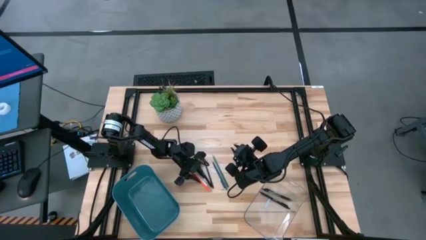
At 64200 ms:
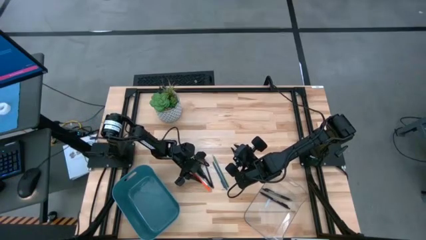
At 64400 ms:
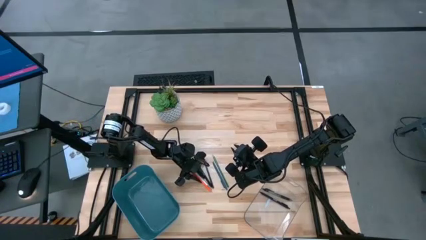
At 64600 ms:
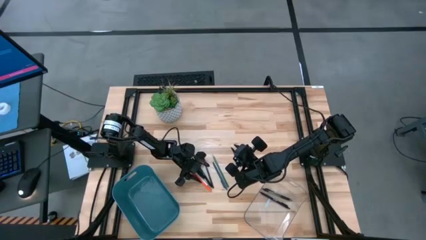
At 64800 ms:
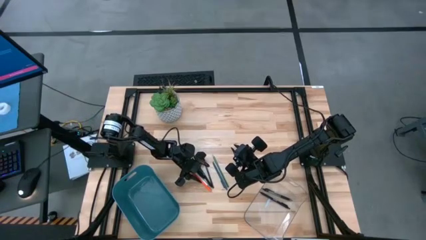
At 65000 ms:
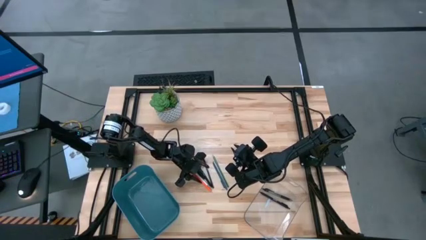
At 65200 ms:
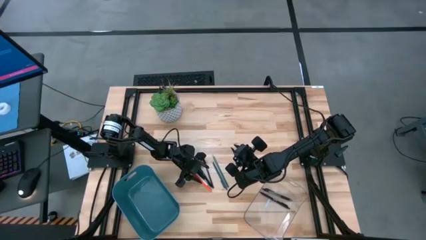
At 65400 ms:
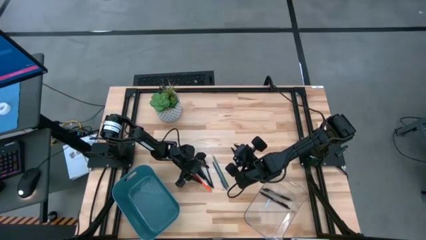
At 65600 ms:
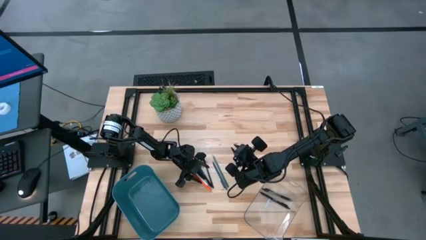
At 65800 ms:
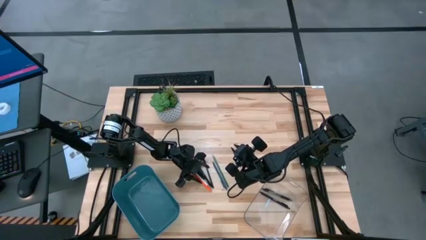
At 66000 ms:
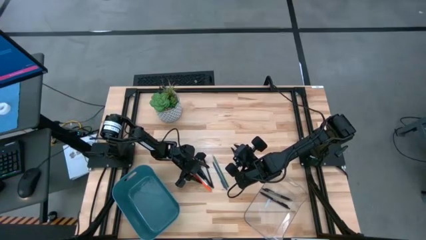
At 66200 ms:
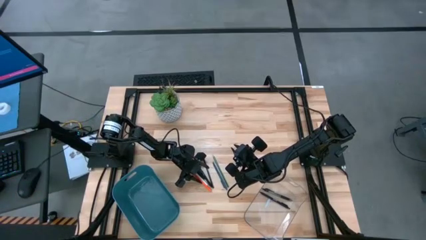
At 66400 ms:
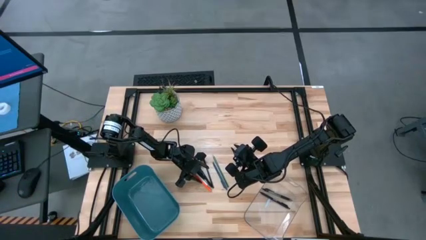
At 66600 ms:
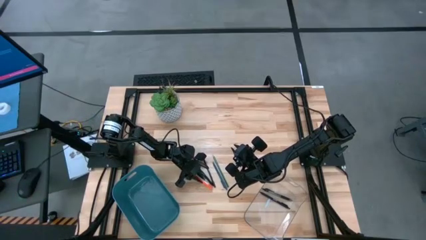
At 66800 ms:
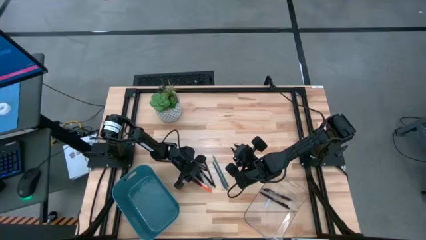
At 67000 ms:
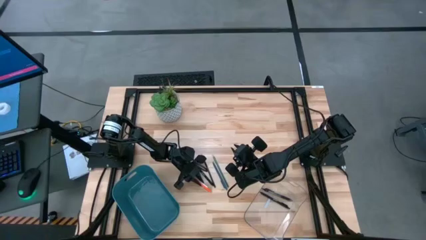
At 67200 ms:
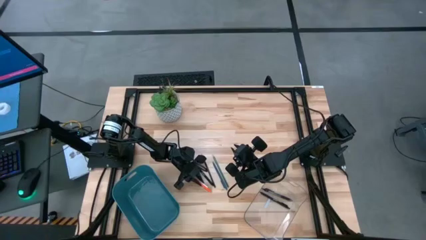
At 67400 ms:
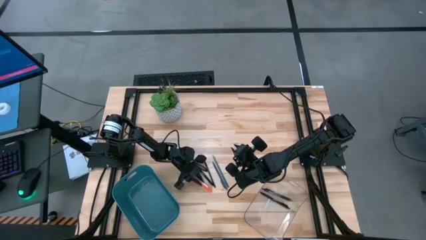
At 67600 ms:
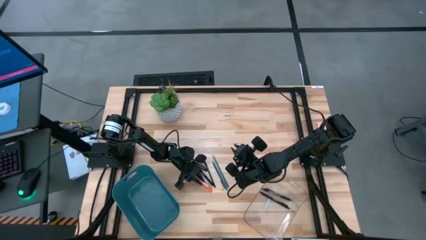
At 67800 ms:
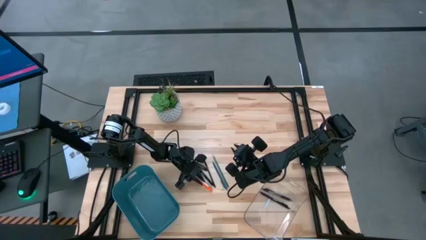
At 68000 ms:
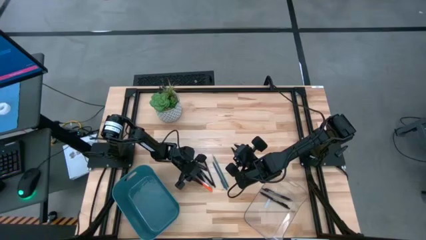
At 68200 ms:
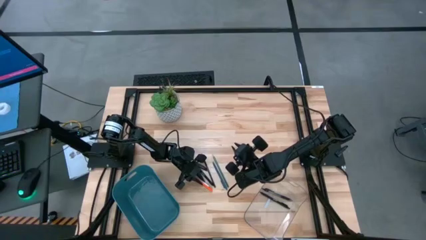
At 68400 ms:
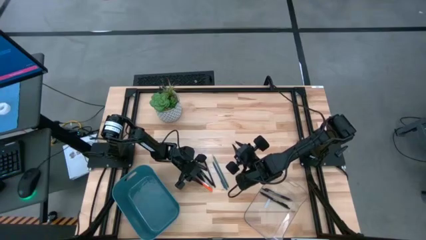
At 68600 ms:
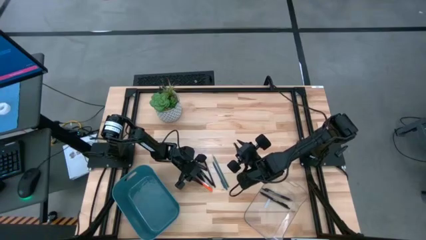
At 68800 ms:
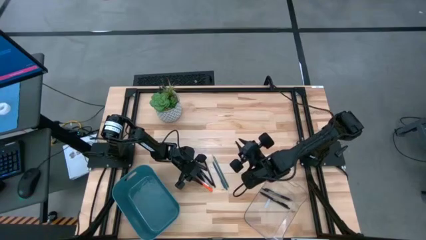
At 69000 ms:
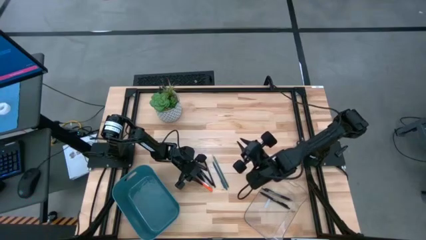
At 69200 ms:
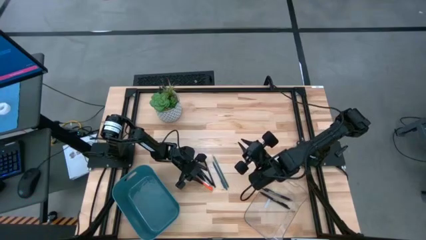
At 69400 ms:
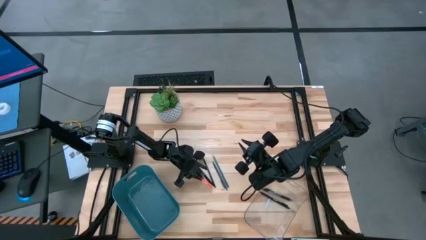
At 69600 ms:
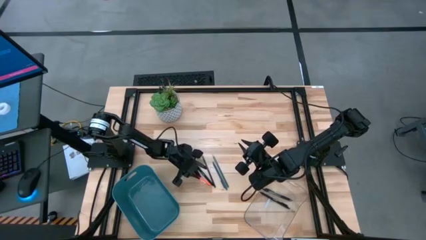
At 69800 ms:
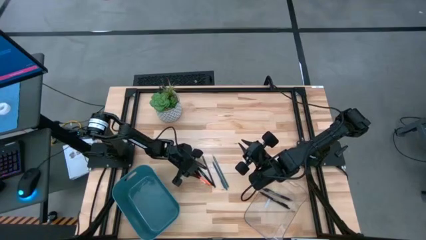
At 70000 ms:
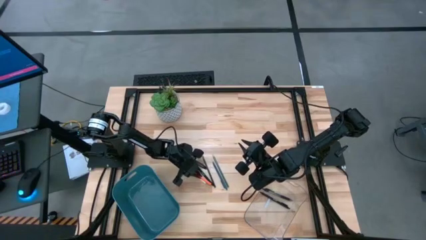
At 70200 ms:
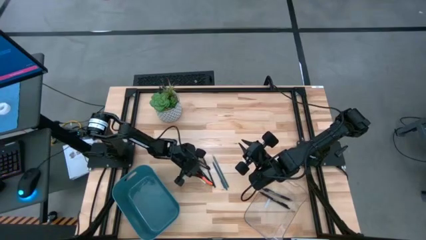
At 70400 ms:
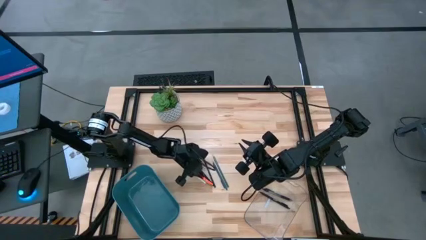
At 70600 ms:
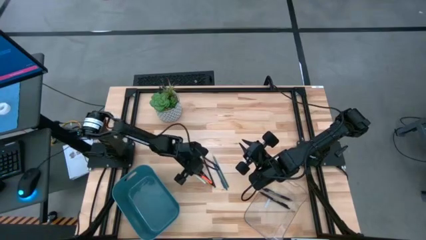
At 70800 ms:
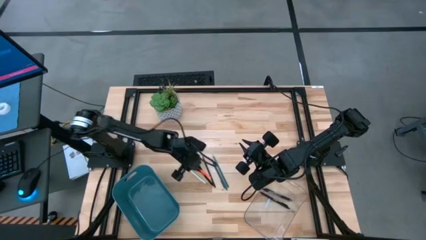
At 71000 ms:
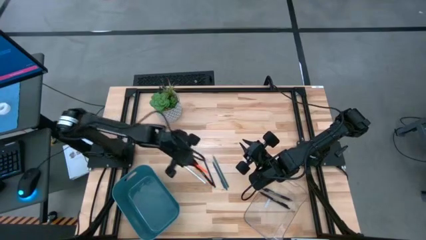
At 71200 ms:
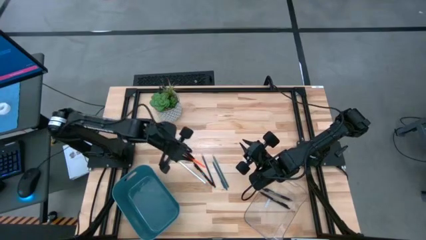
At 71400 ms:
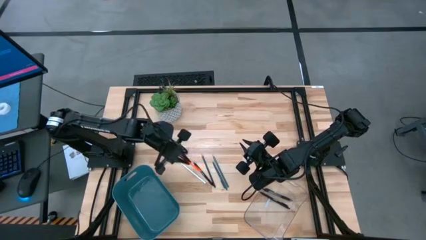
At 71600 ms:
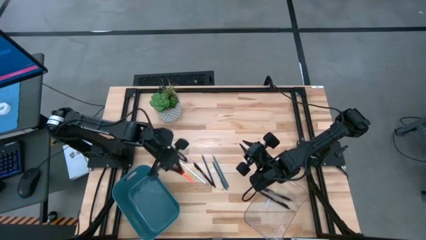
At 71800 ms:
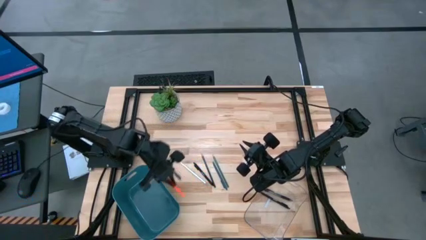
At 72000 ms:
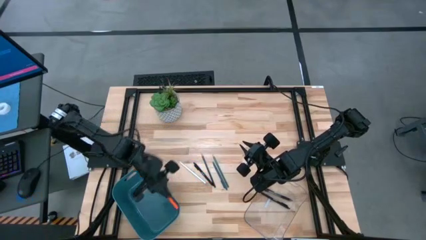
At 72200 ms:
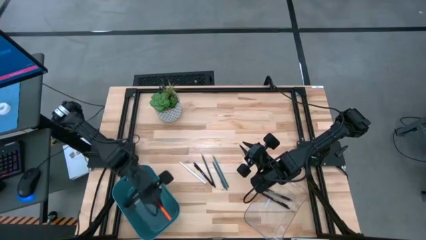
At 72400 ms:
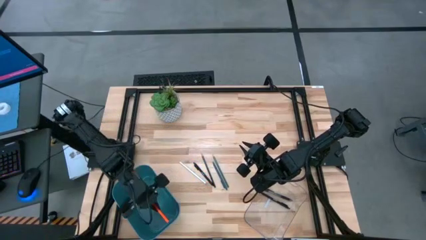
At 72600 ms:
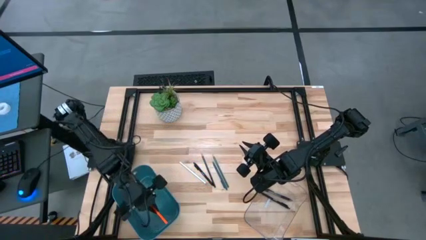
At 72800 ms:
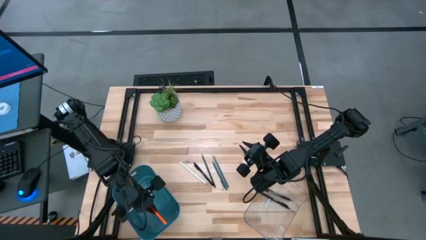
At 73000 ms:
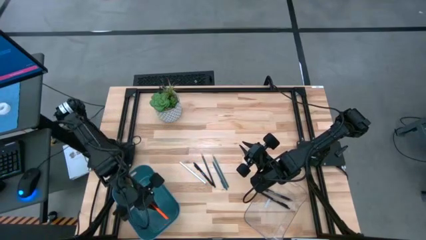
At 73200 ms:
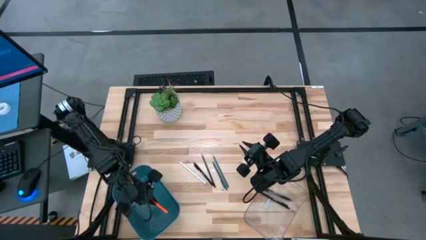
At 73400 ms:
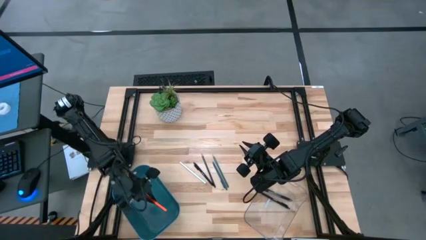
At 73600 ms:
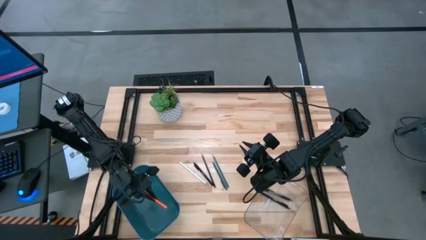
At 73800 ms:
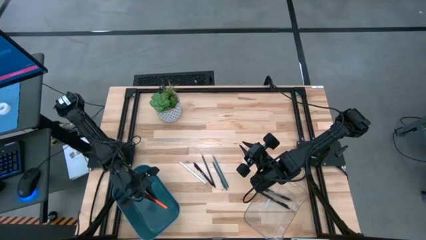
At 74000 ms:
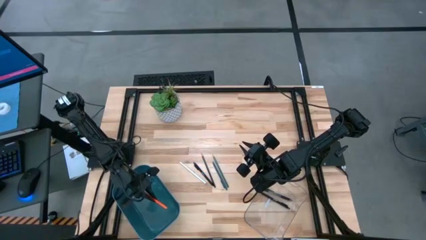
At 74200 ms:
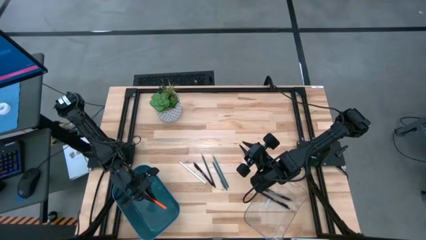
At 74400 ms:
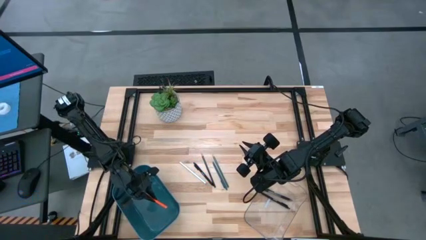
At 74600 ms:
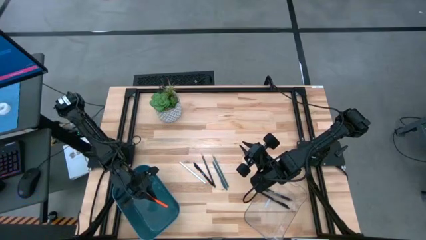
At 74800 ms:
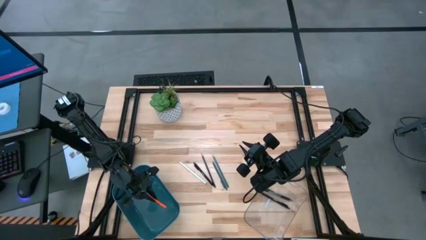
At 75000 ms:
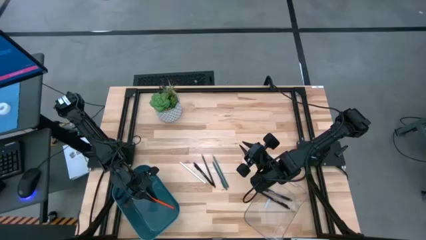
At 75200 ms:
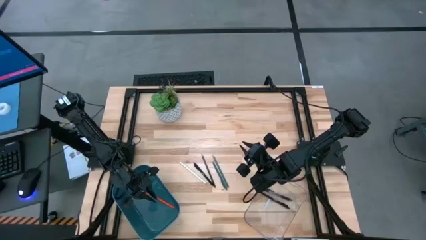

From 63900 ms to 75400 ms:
Task: Sort pens & pencils
Put the orange pencil into the blue bin
